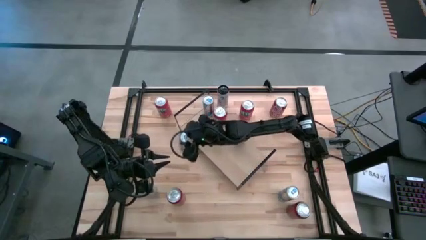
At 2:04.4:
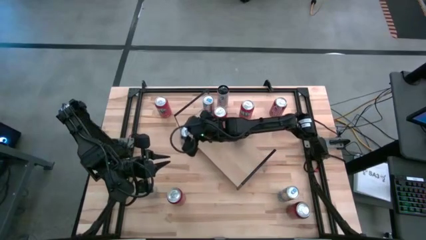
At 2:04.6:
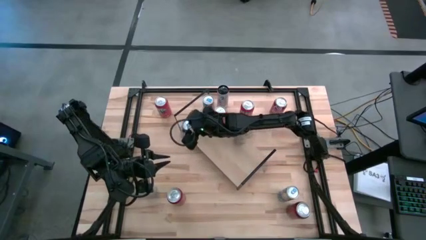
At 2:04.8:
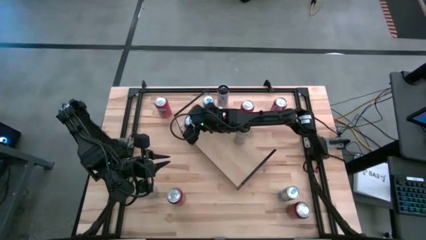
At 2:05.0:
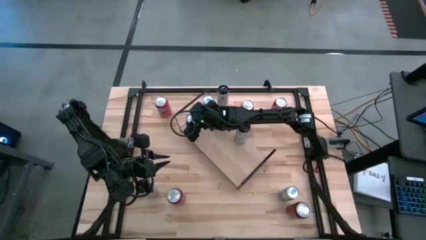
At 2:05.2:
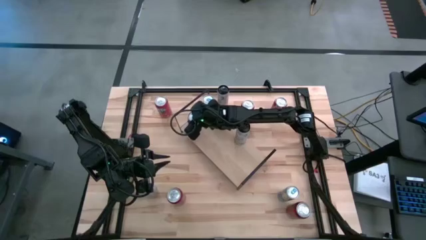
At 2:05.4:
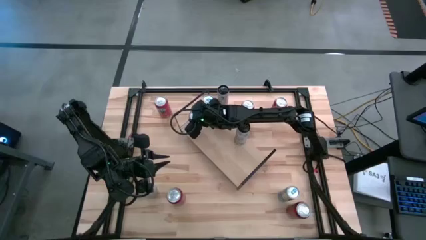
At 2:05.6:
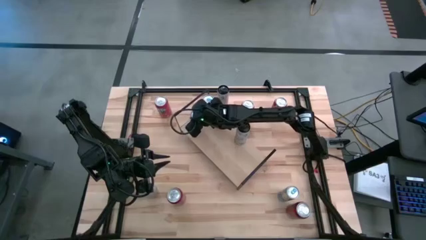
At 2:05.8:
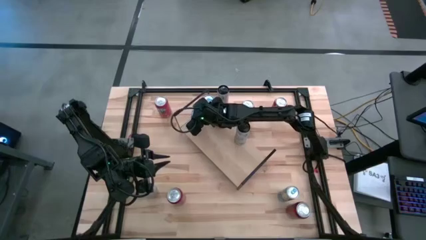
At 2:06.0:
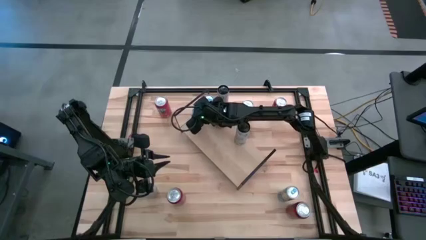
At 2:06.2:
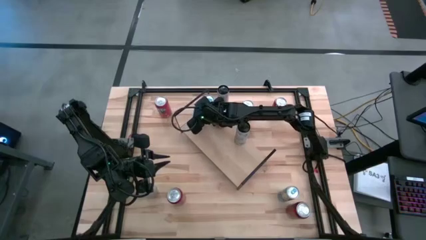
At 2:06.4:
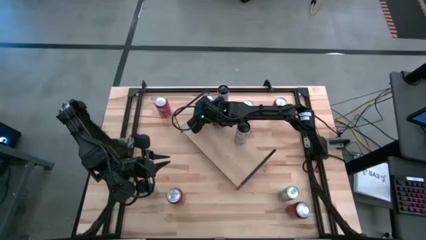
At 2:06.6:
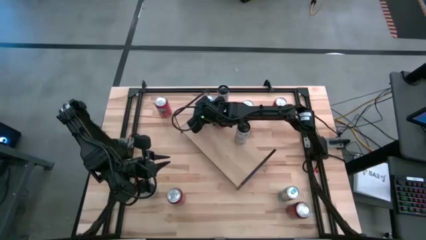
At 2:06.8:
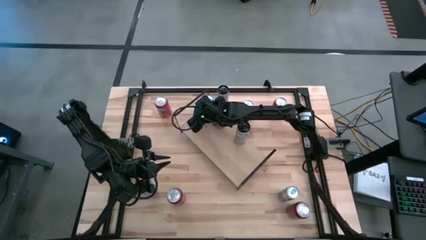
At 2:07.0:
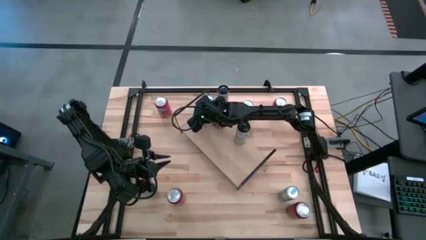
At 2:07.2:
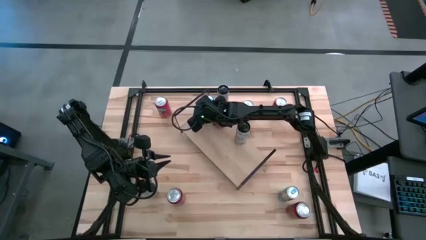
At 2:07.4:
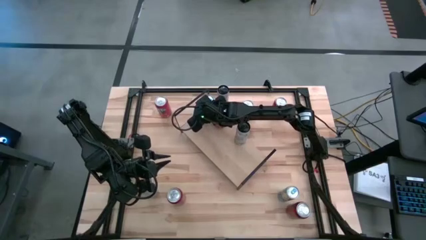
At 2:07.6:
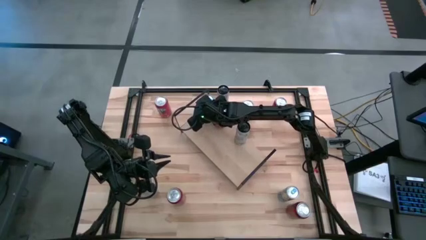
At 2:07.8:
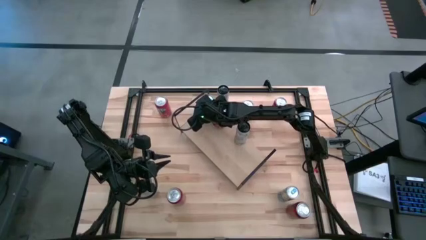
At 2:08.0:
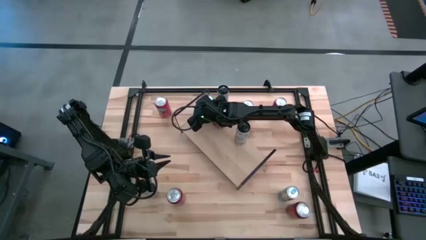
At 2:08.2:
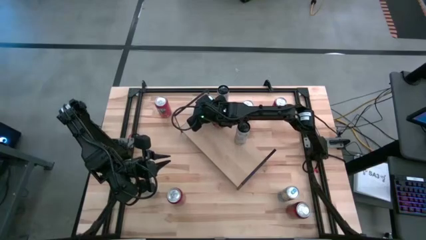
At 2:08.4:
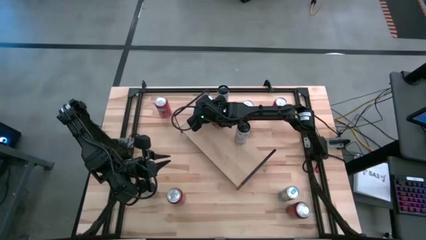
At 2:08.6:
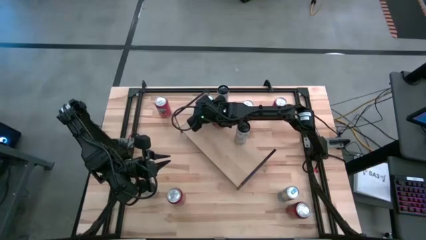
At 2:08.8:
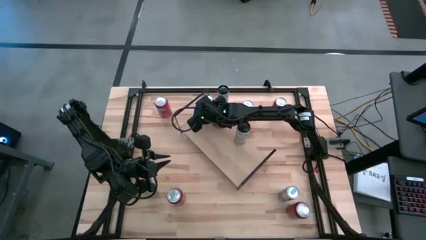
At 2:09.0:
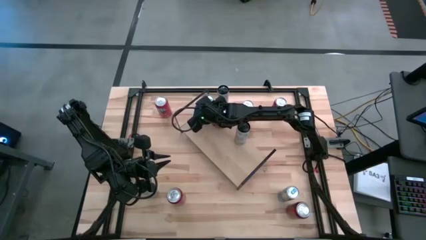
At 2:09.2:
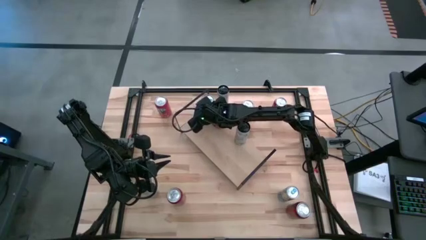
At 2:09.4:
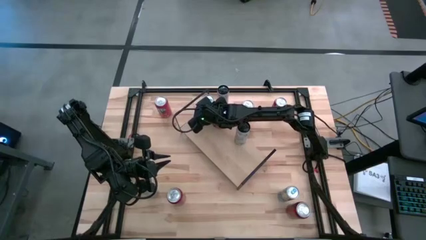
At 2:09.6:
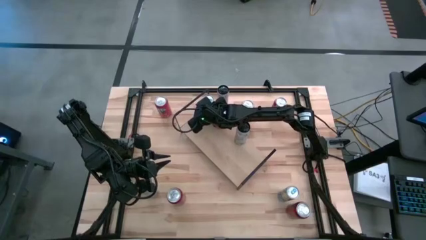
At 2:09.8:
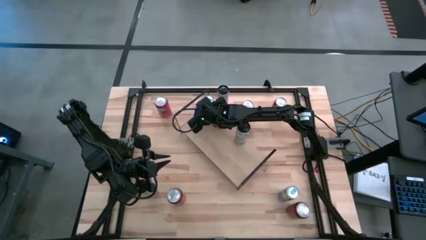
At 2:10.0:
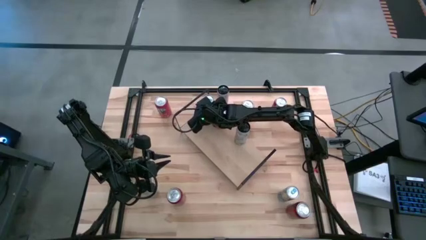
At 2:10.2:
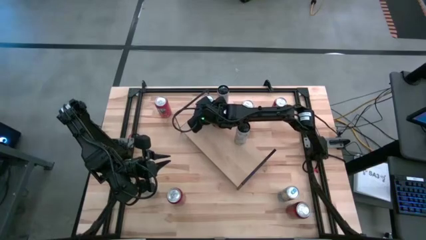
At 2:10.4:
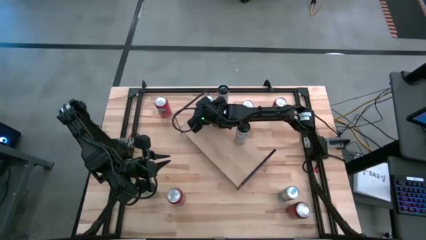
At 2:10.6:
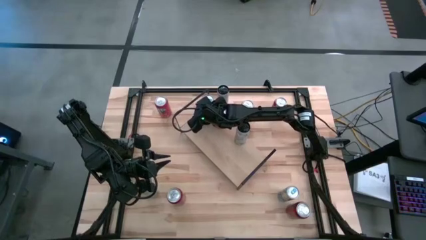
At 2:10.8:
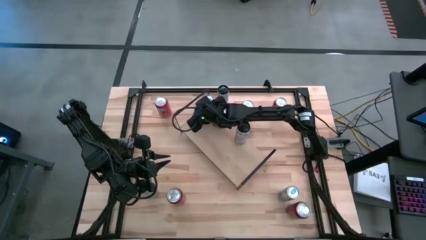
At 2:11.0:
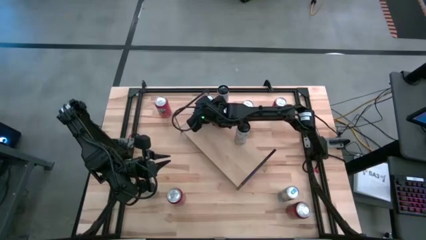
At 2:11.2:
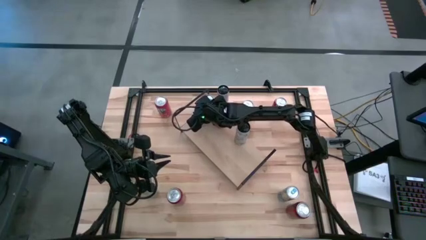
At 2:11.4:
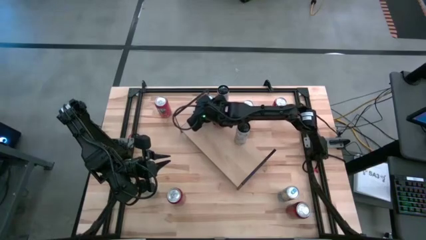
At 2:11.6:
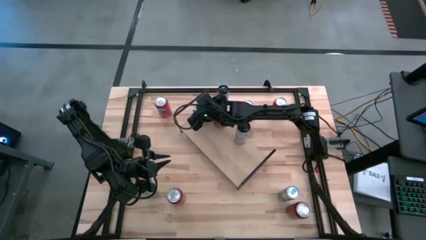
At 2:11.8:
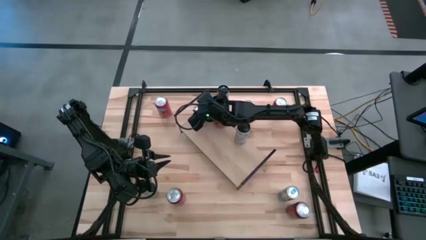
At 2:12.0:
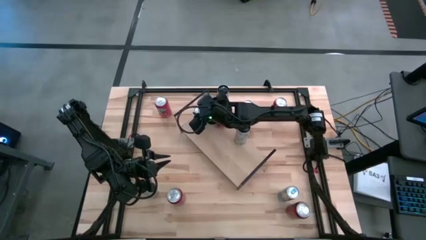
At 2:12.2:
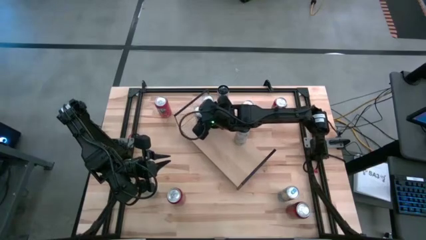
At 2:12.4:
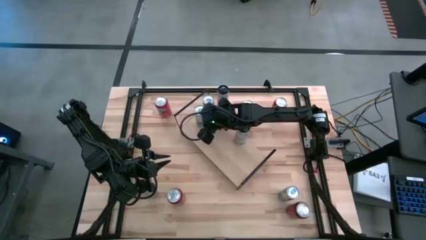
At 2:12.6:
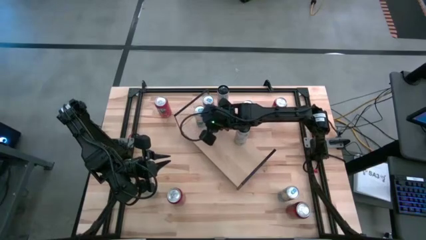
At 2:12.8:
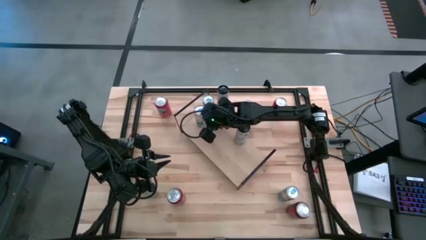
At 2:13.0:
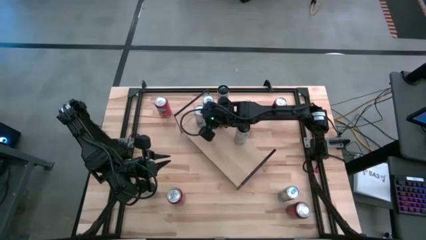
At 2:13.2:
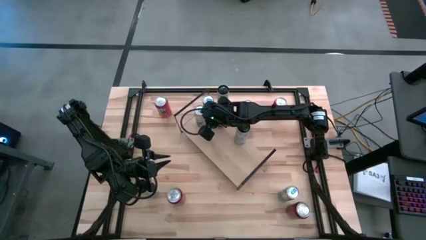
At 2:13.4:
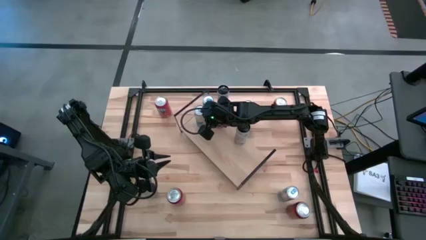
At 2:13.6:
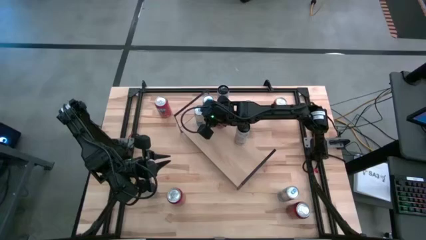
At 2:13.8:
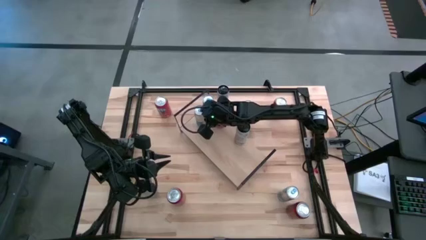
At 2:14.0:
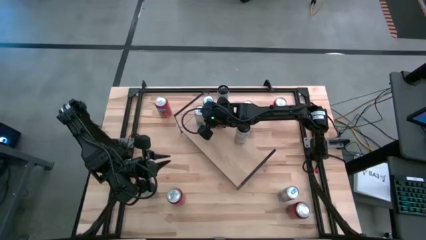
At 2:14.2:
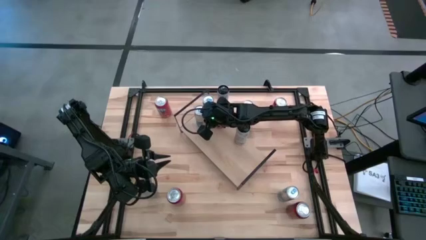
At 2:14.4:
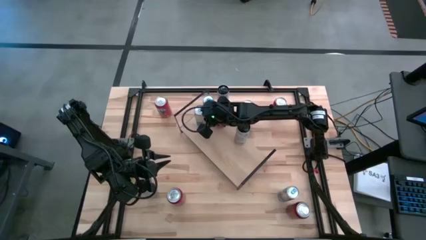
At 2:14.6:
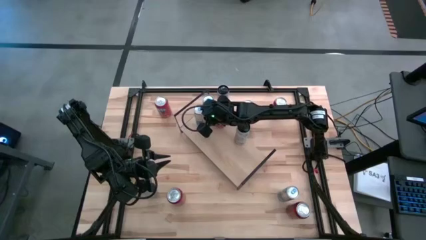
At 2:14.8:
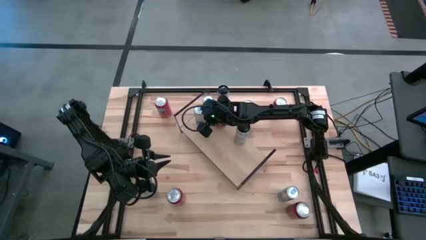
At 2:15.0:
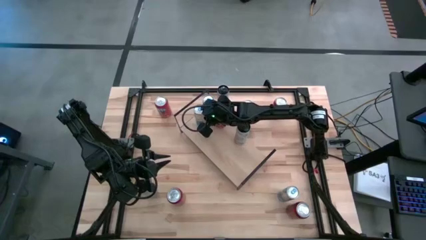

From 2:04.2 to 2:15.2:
Task: Place canned beverage on shelf
Put the left blue soda can on the shelf aligned with the blue can on the shelf

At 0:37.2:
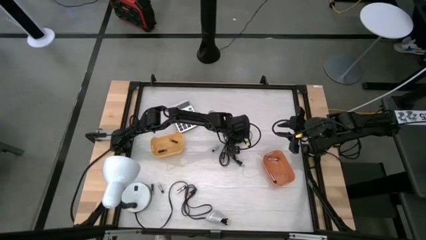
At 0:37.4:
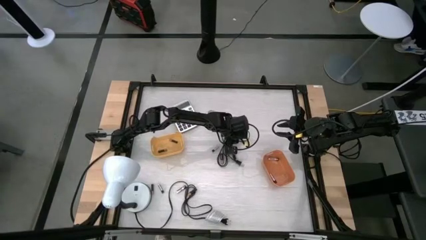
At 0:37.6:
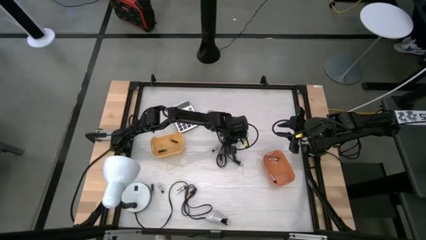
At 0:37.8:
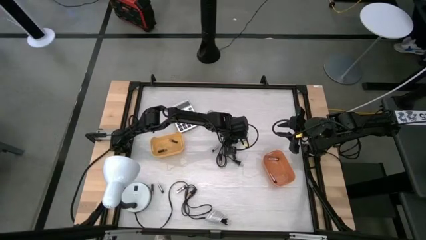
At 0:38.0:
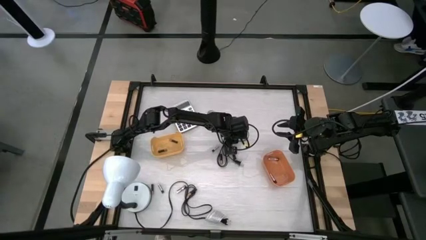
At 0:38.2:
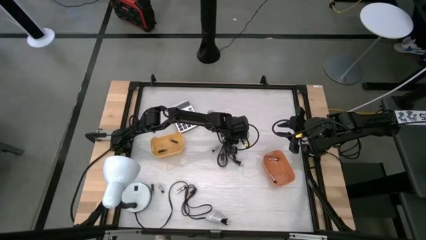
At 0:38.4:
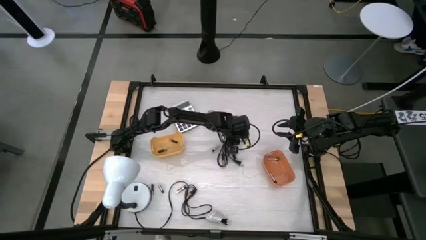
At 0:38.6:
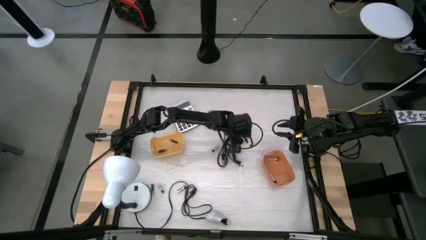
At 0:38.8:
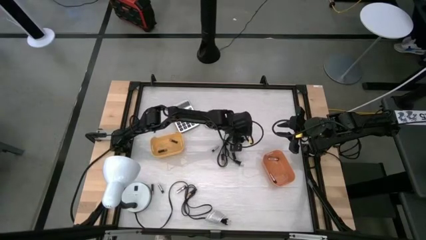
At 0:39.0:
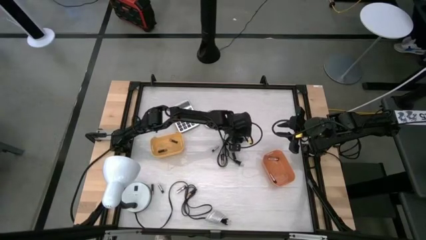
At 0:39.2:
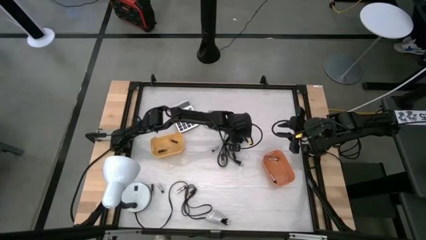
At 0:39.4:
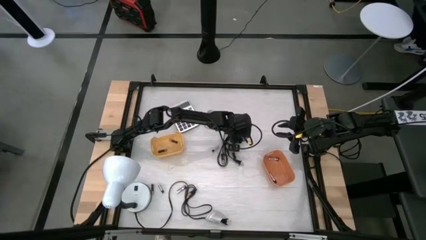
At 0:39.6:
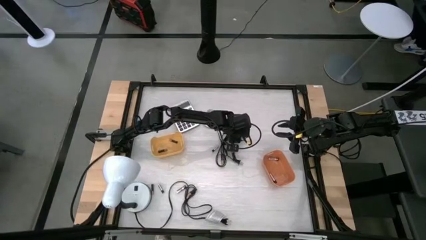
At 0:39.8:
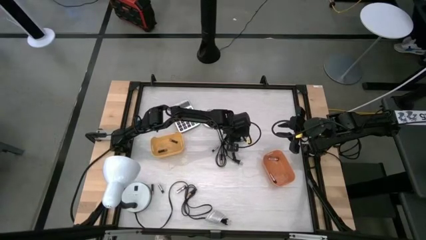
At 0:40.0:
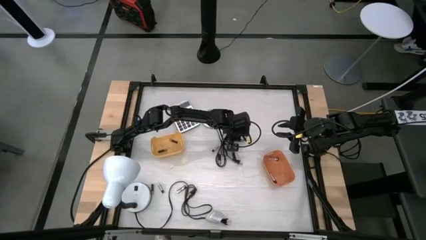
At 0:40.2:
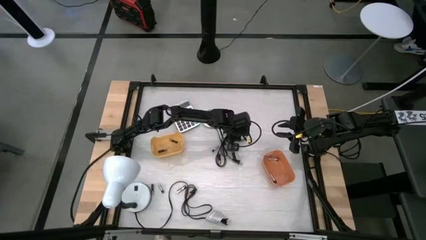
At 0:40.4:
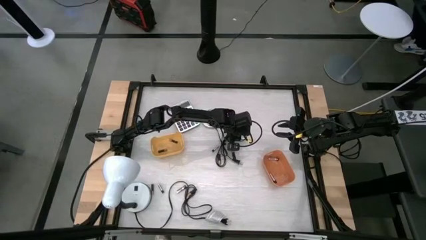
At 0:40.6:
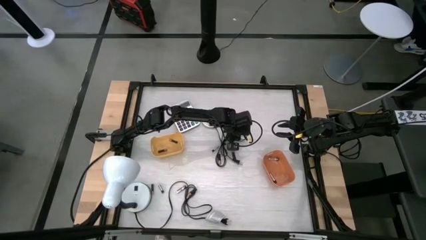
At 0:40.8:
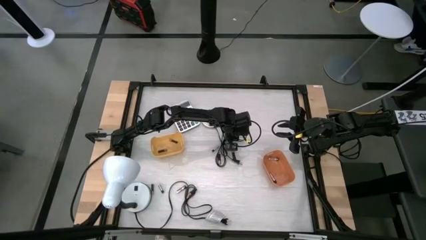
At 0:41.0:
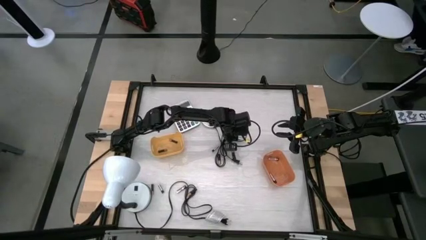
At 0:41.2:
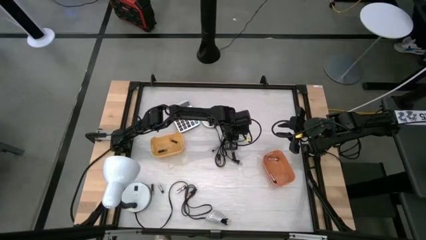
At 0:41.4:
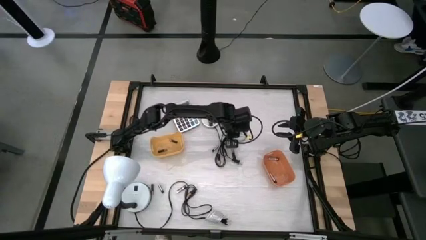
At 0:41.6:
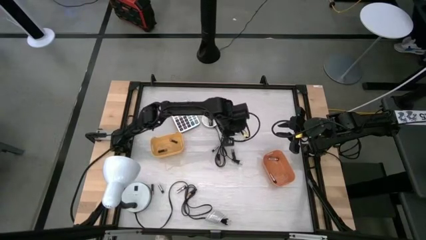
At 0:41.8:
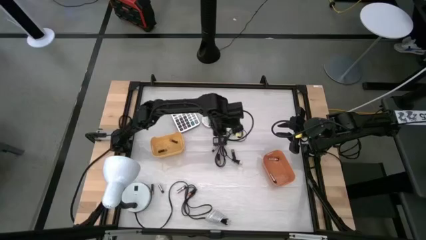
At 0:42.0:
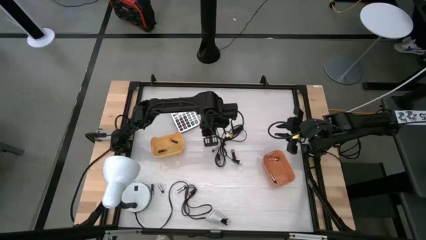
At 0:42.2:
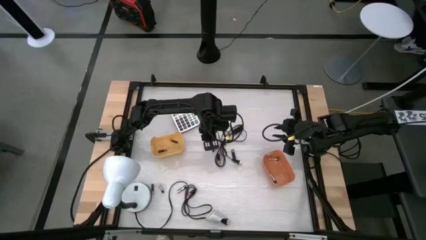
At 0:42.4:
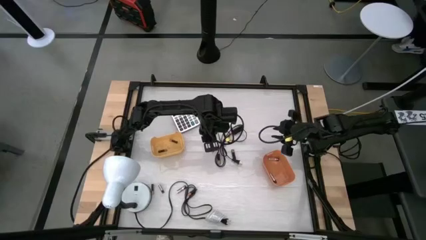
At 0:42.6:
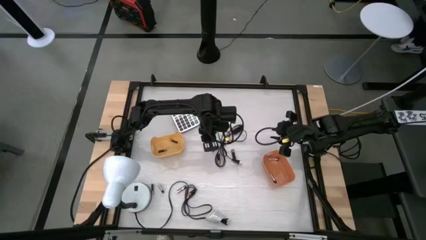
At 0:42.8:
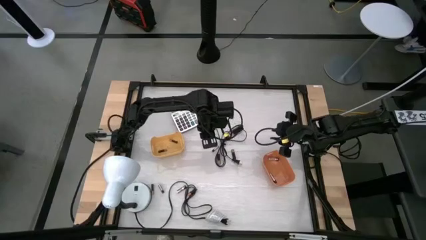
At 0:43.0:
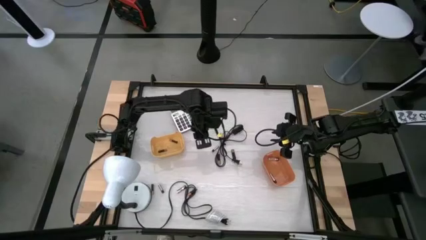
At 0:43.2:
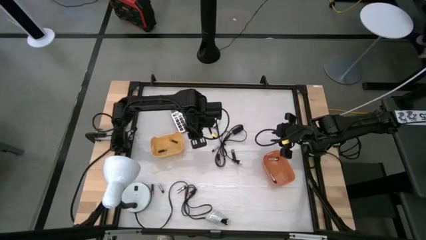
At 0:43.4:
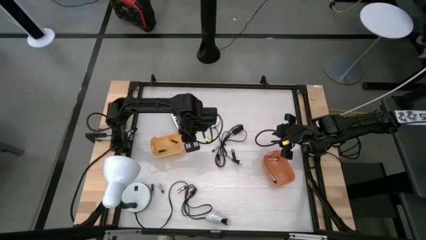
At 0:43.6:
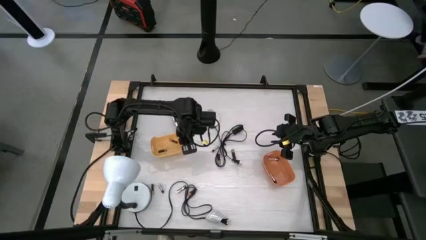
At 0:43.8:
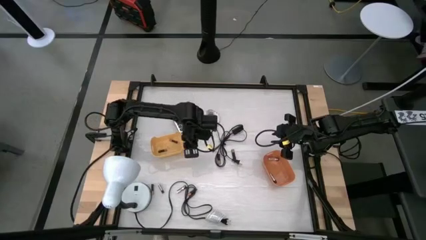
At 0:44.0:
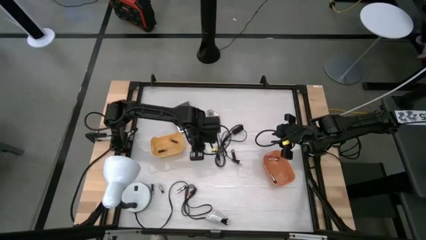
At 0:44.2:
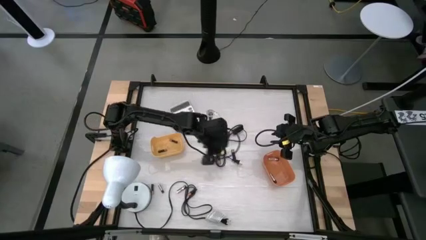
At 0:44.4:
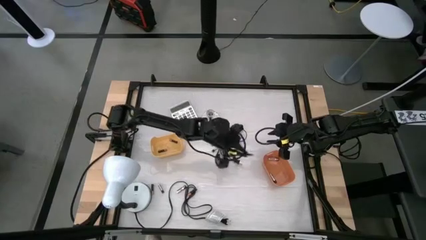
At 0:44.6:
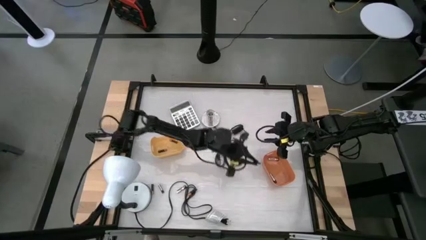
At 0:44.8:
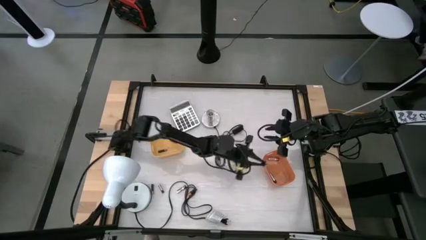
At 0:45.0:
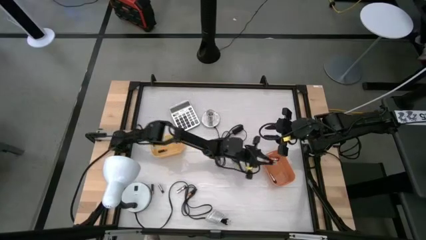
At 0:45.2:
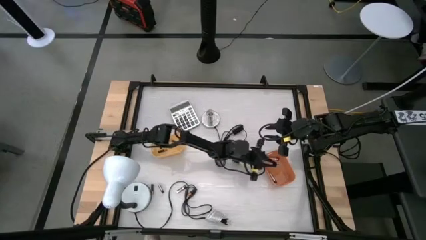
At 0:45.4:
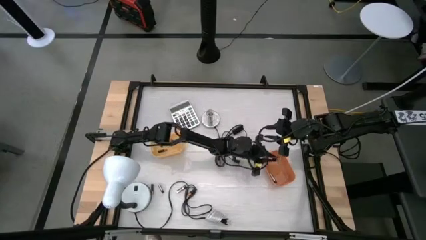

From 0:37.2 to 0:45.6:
Task: Sort batteries
Put the silver battery into the orange bin
